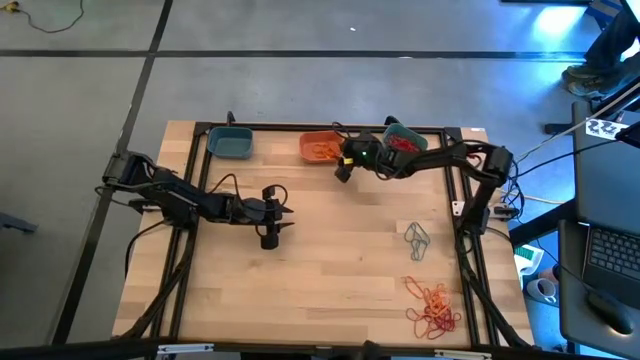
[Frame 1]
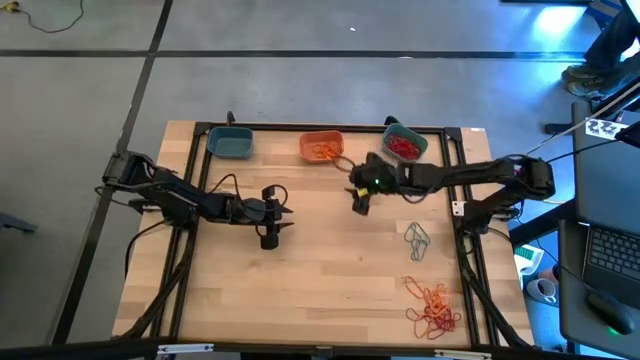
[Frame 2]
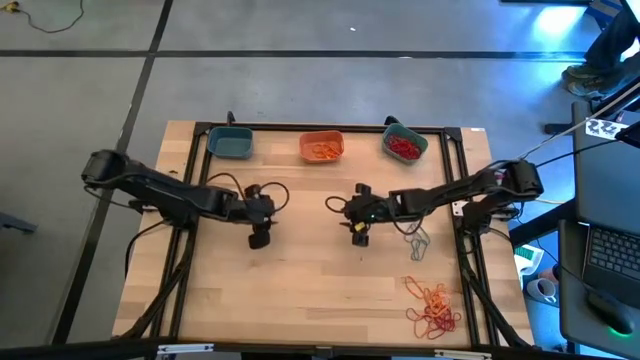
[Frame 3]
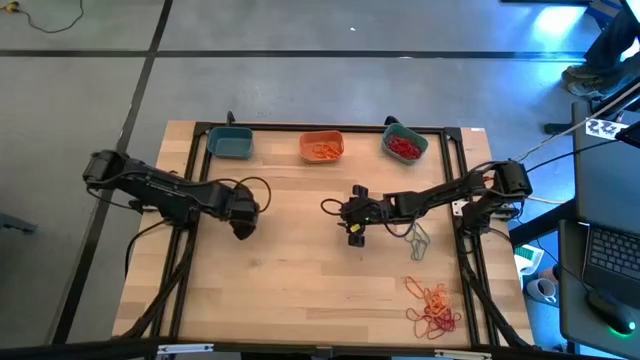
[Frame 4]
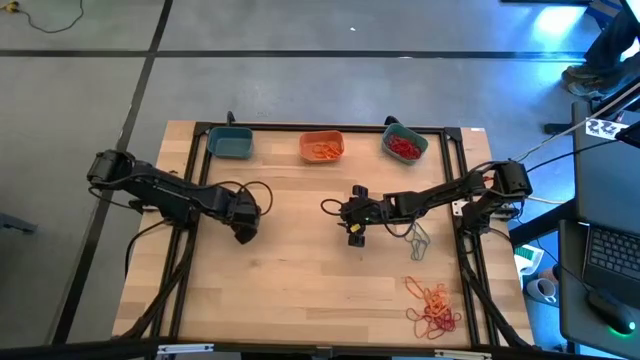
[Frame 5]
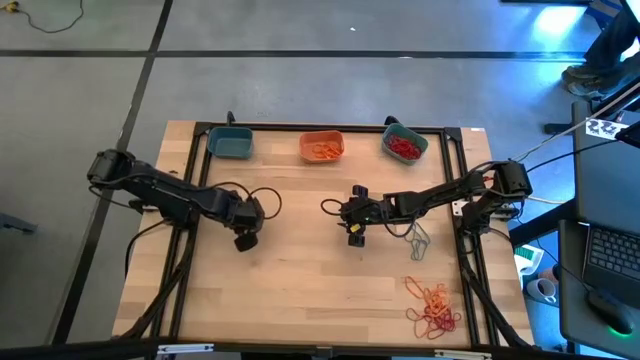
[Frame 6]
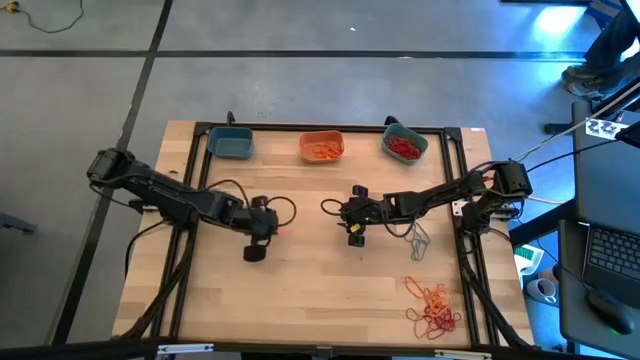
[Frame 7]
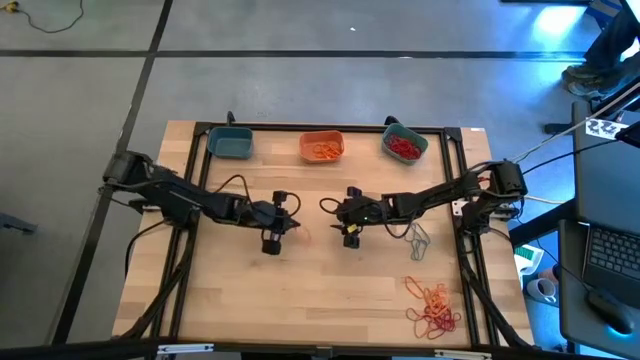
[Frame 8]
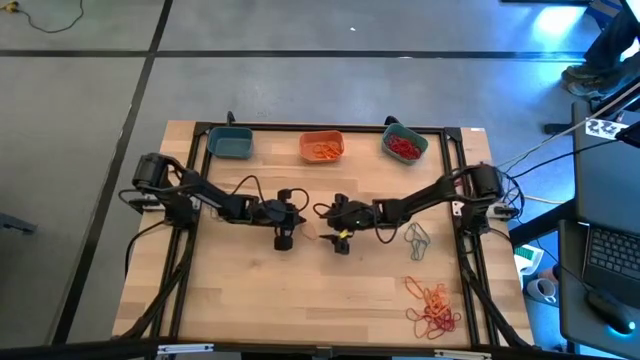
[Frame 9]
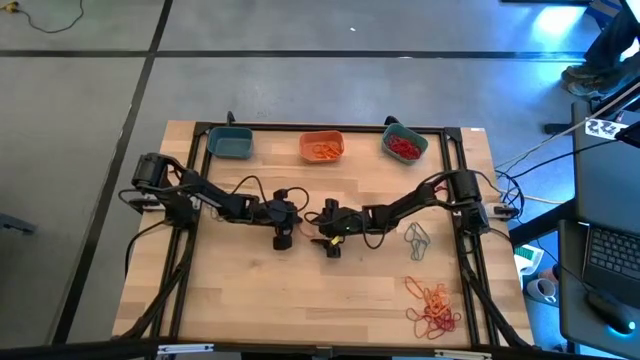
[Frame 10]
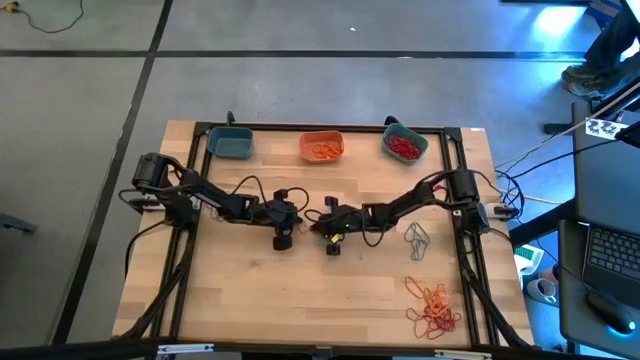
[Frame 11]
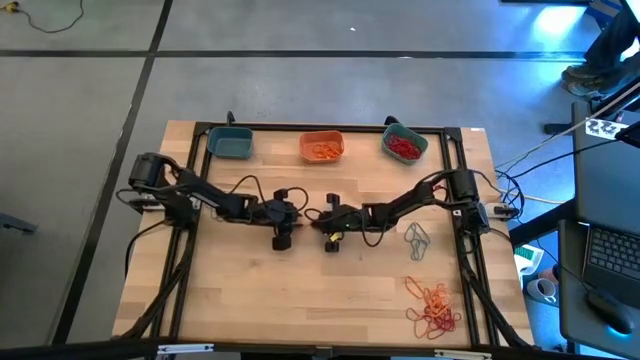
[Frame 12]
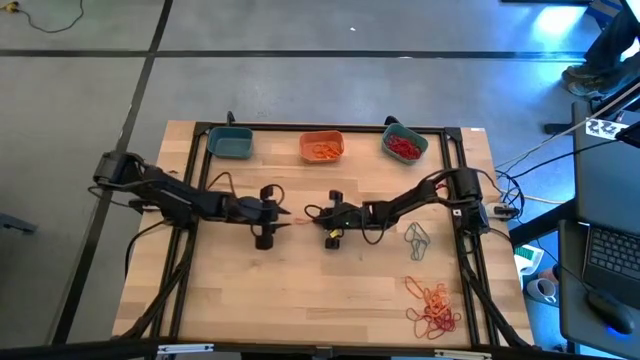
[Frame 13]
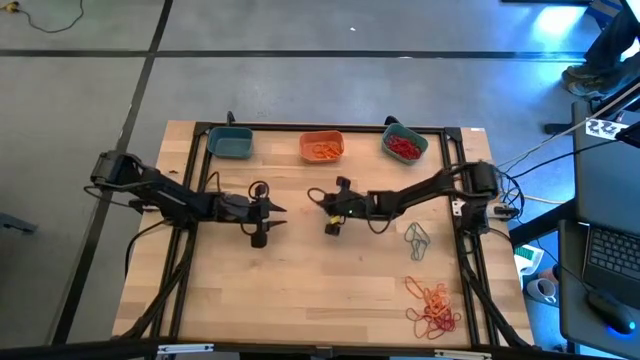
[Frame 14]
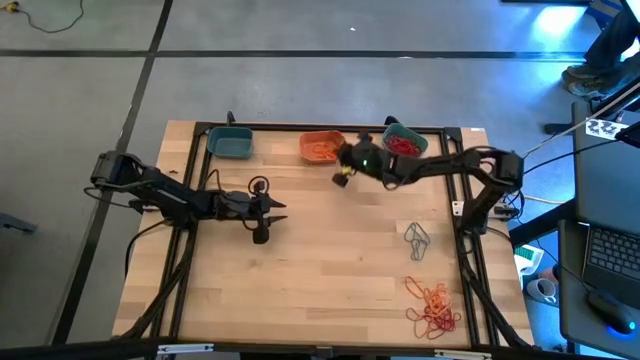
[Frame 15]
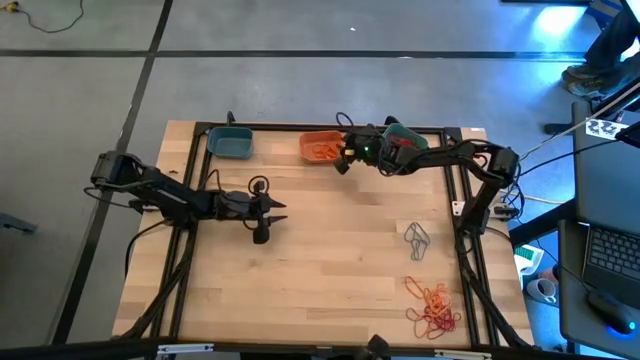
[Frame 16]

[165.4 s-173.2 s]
Task: Sort rubber bands into baskets
Put the orange rubber band into the orange bin

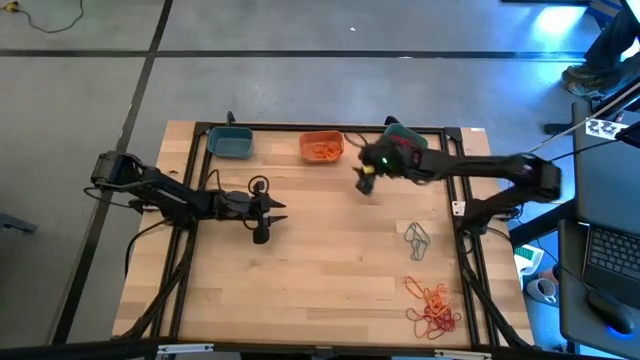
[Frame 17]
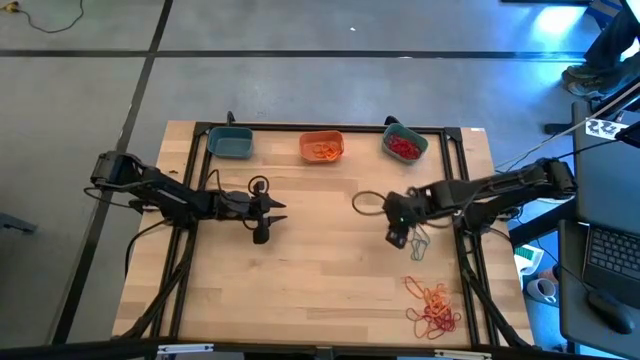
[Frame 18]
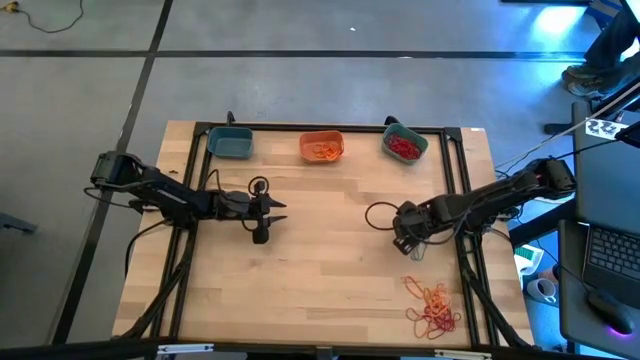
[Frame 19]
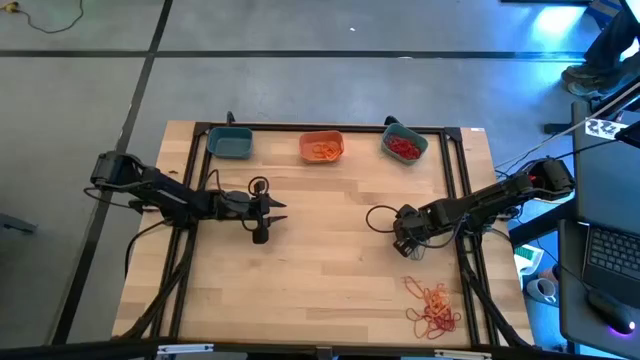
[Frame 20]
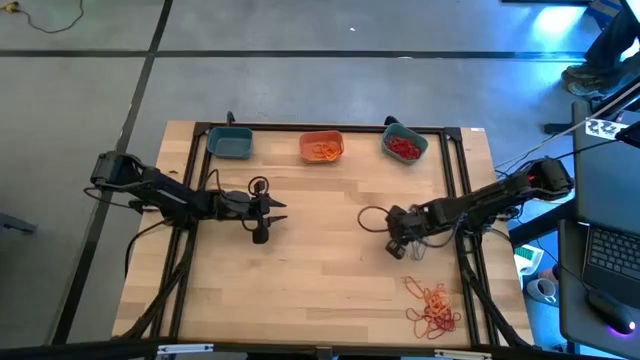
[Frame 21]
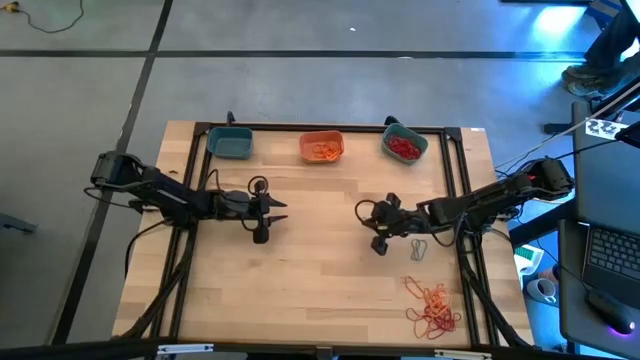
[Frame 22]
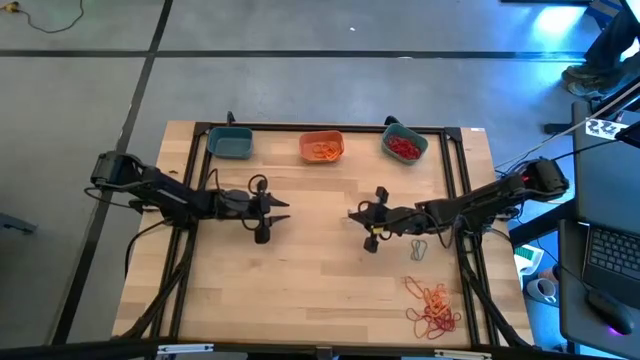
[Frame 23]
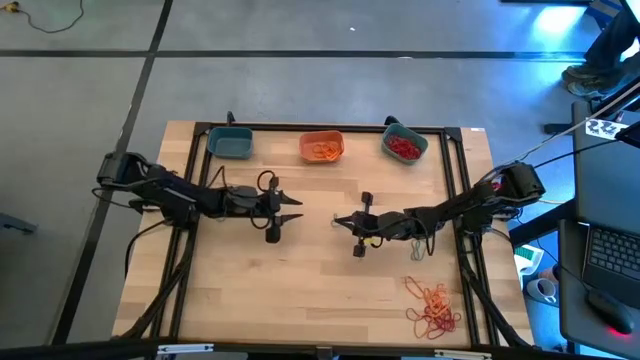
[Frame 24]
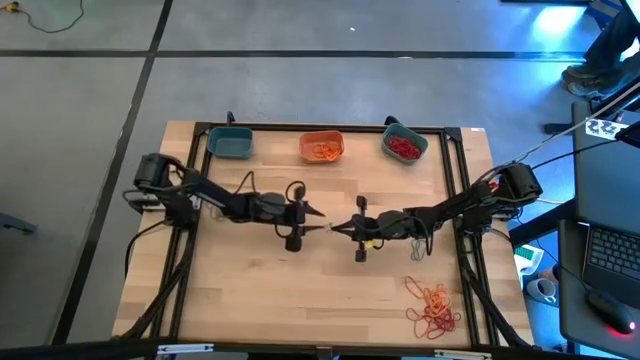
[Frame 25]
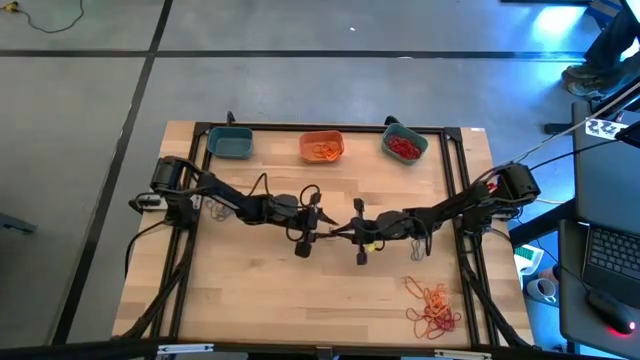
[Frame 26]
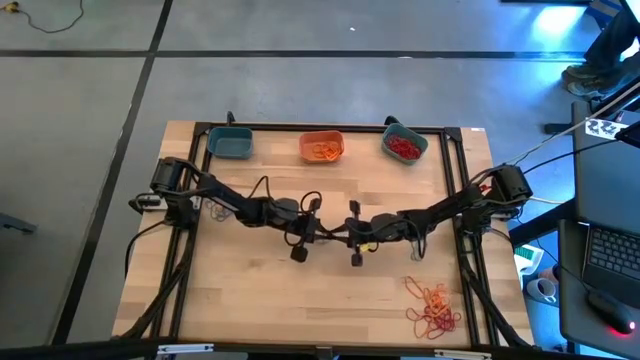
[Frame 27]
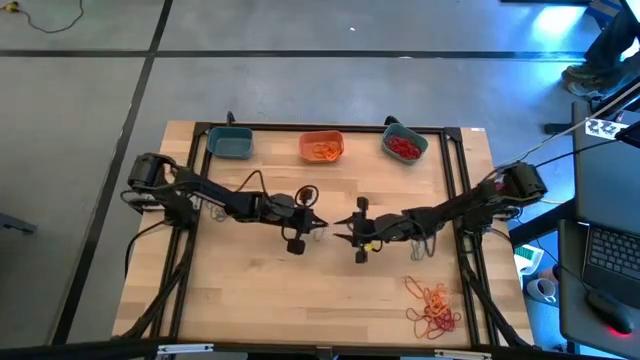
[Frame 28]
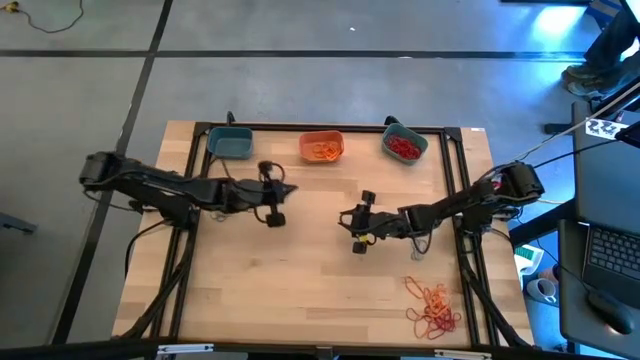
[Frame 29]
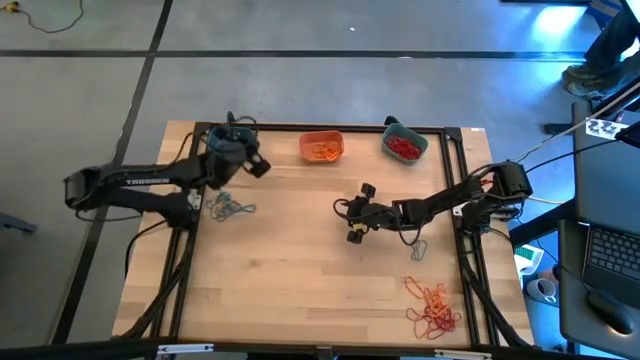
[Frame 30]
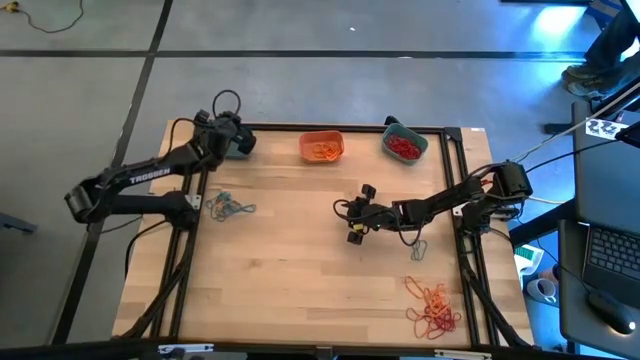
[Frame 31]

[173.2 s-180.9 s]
Put the blue rubber band into the blue bin

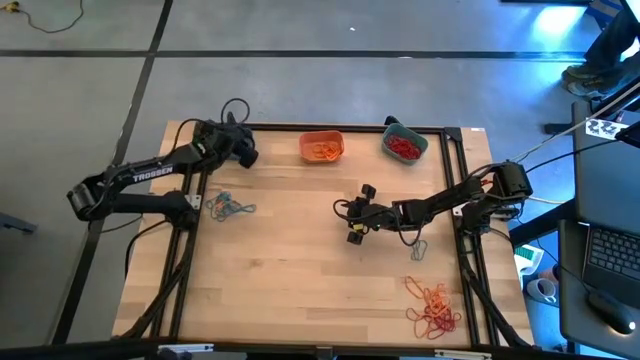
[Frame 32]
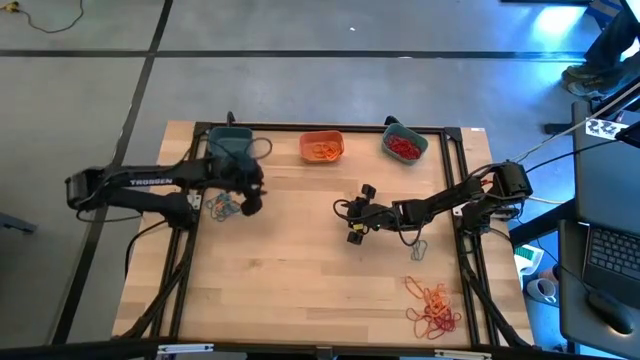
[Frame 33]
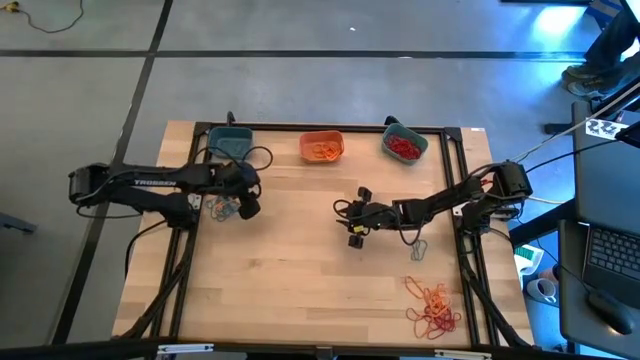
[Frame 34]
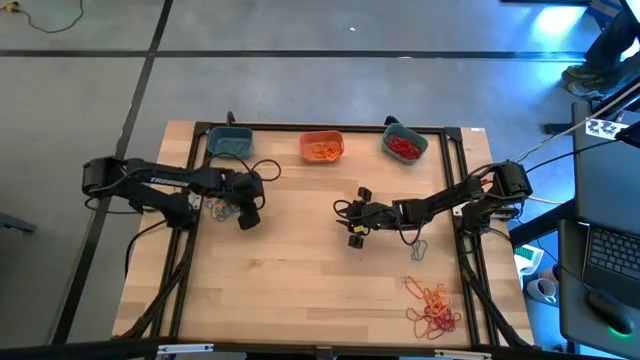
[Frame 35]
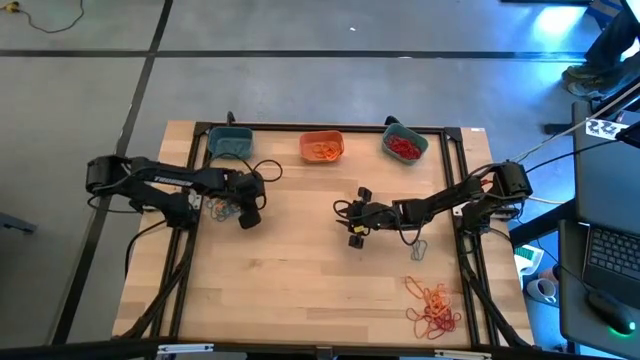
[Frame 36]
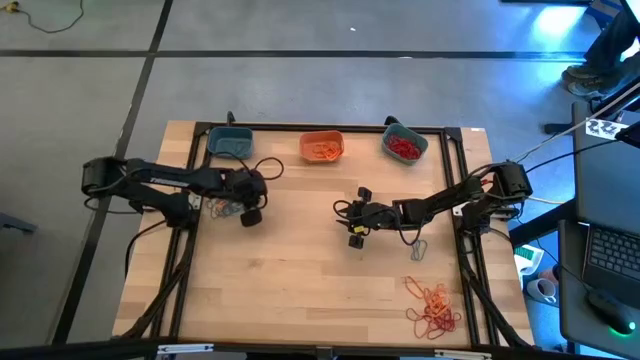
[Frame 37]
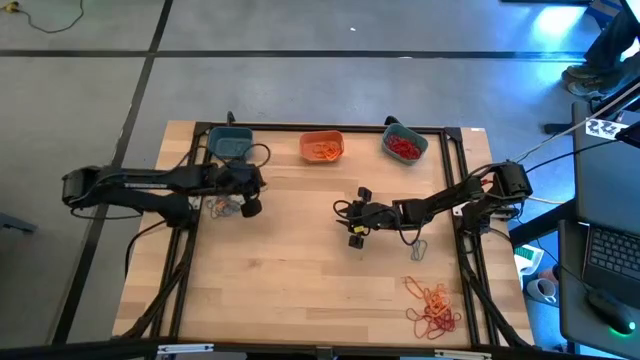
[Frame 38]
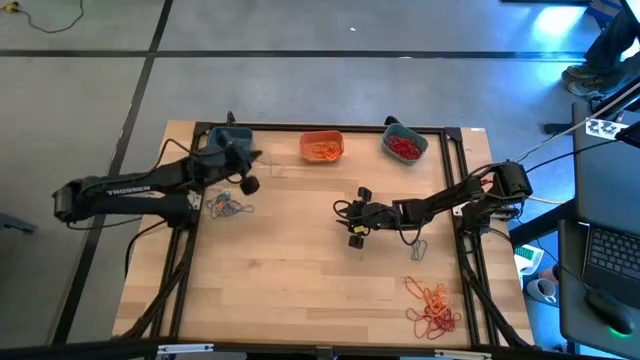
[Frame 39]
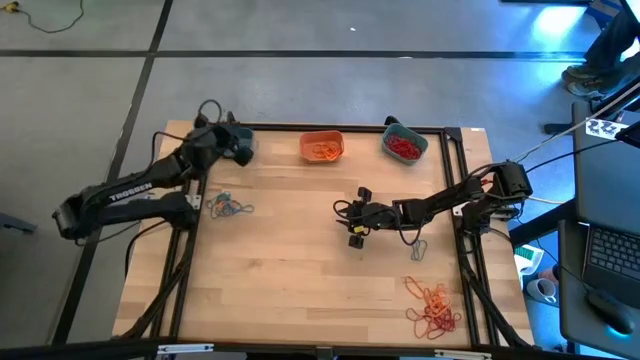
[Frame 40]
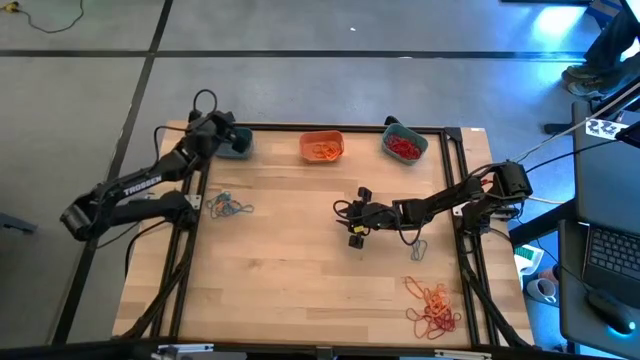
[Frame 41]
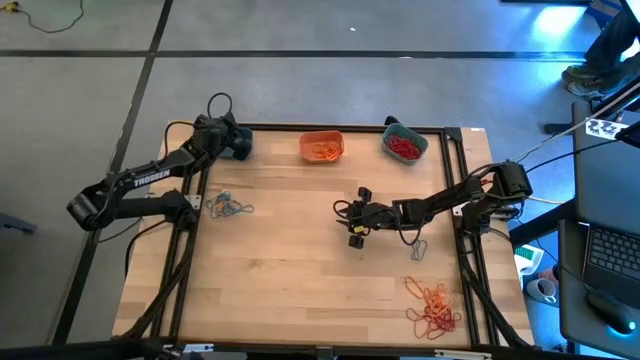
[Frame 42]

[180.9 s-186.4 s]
Put the blue rubber band into the blue bin
